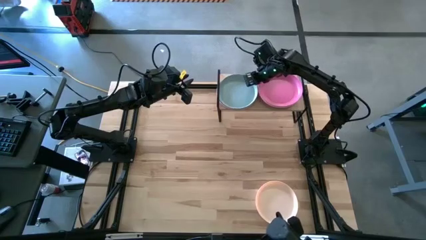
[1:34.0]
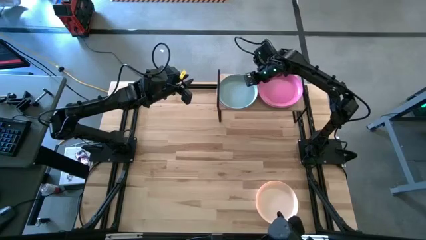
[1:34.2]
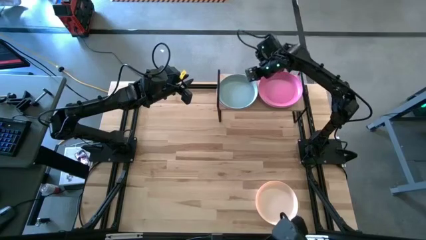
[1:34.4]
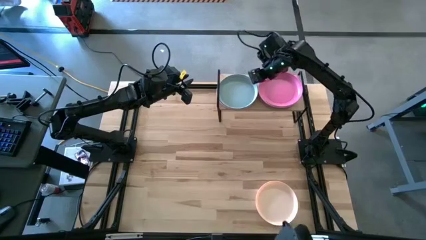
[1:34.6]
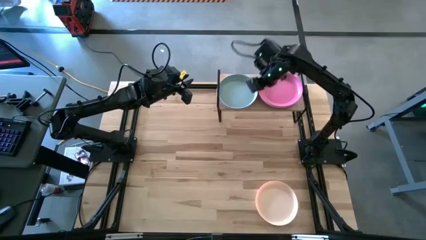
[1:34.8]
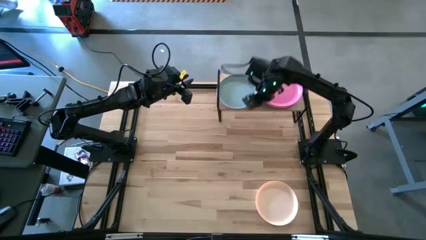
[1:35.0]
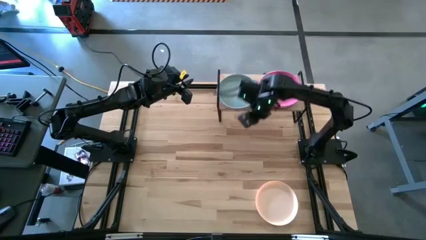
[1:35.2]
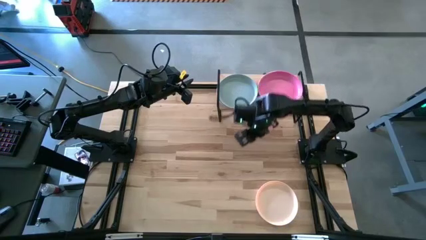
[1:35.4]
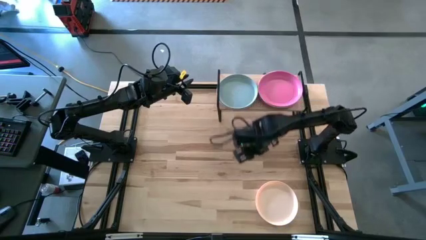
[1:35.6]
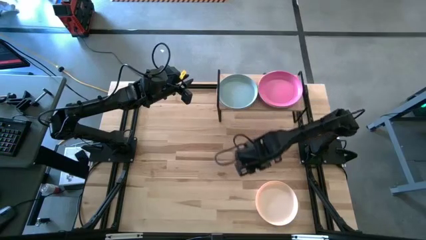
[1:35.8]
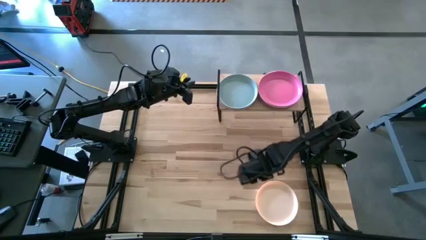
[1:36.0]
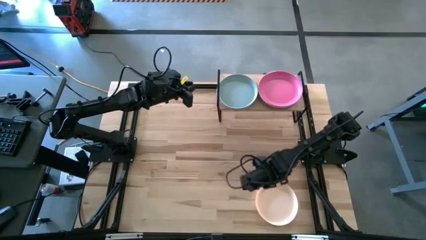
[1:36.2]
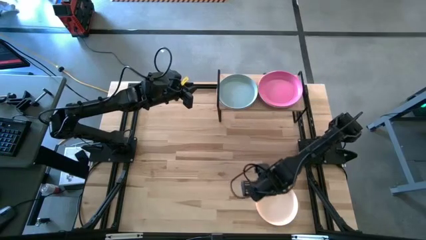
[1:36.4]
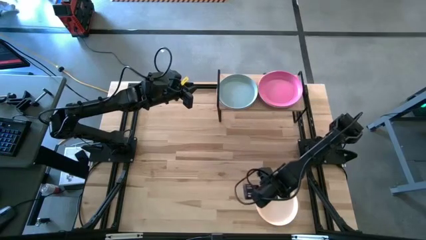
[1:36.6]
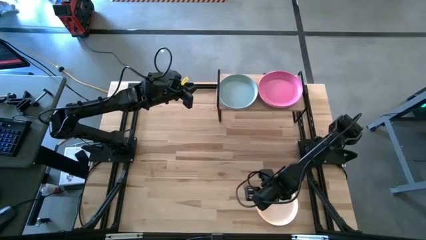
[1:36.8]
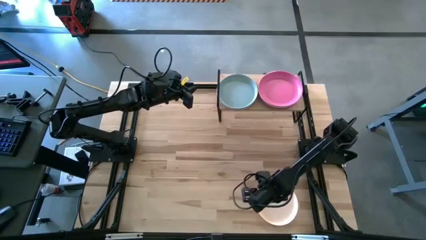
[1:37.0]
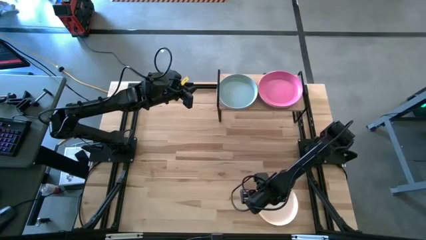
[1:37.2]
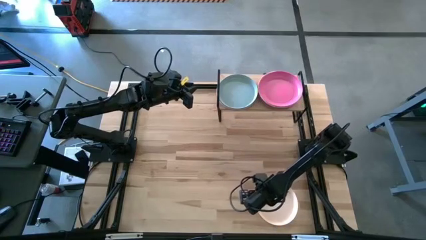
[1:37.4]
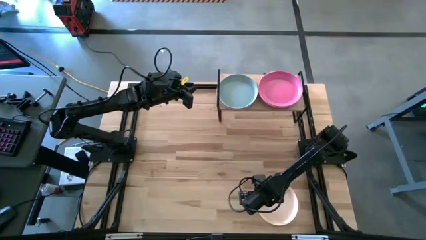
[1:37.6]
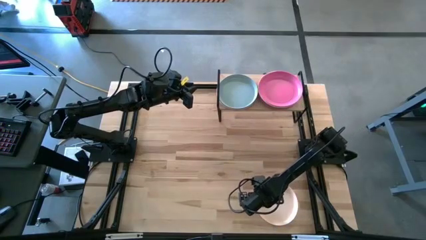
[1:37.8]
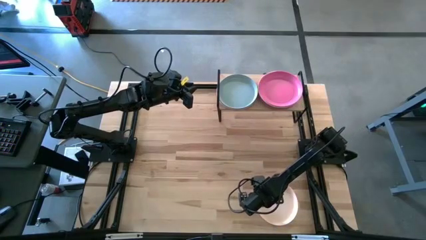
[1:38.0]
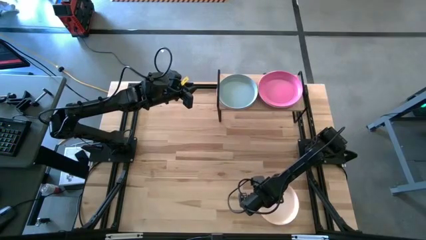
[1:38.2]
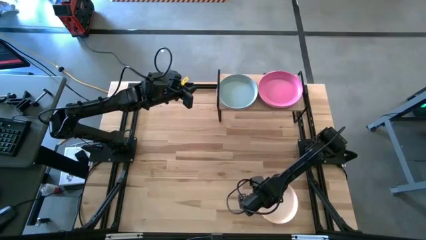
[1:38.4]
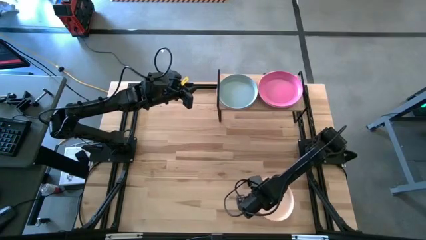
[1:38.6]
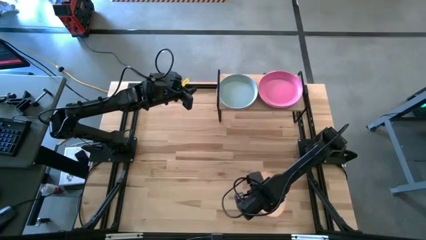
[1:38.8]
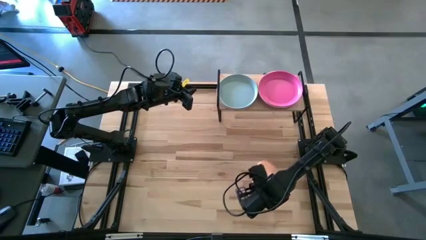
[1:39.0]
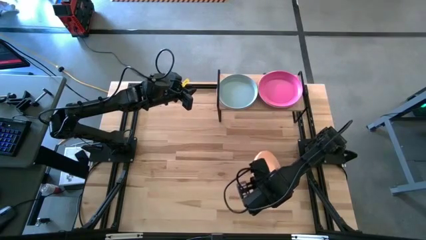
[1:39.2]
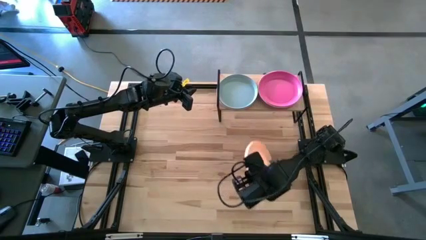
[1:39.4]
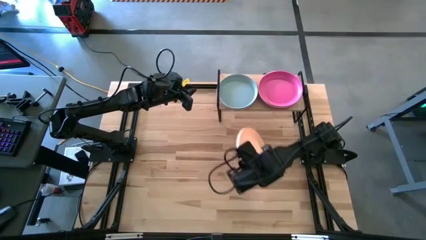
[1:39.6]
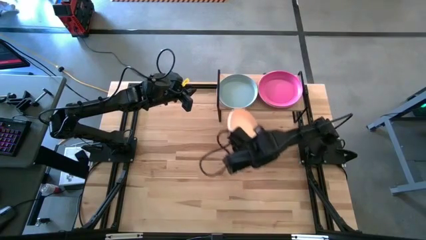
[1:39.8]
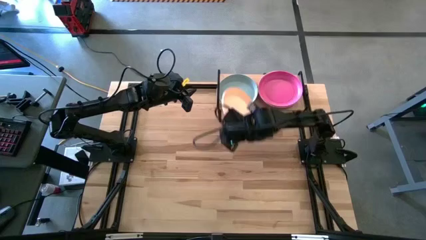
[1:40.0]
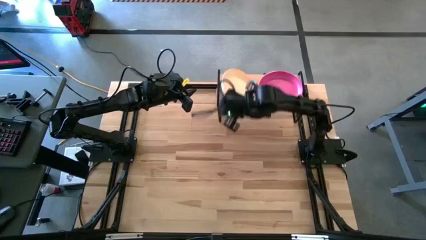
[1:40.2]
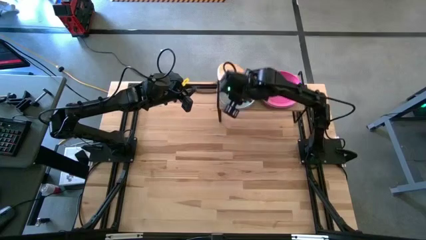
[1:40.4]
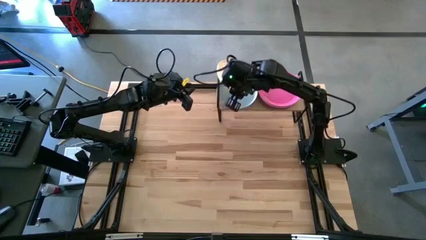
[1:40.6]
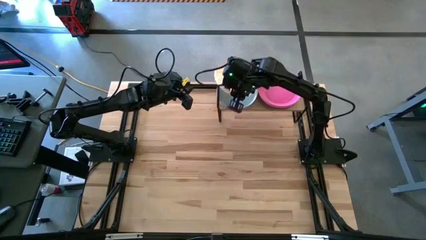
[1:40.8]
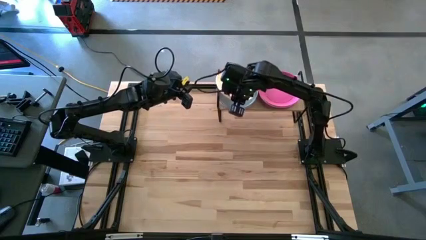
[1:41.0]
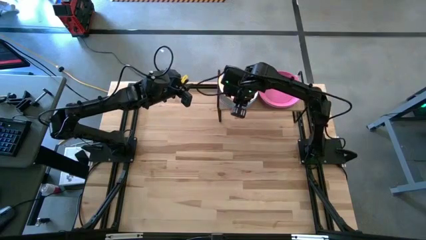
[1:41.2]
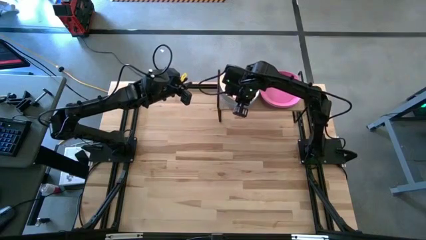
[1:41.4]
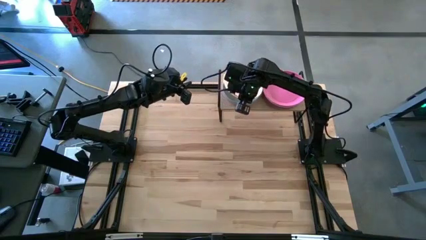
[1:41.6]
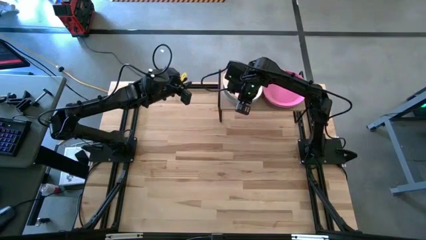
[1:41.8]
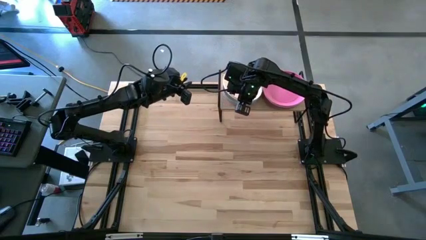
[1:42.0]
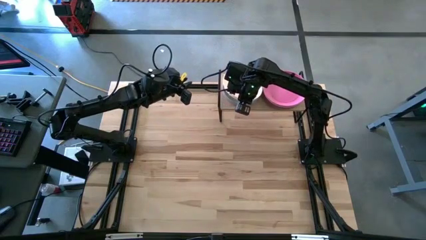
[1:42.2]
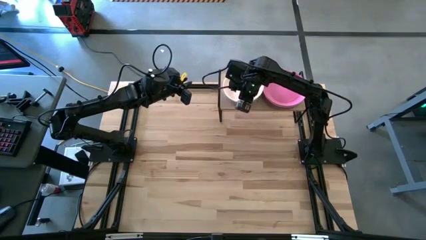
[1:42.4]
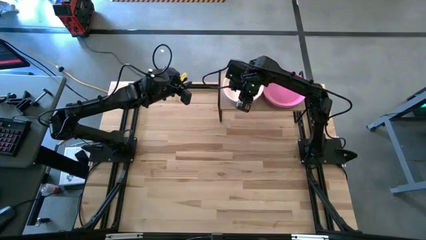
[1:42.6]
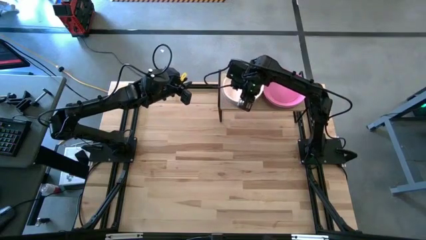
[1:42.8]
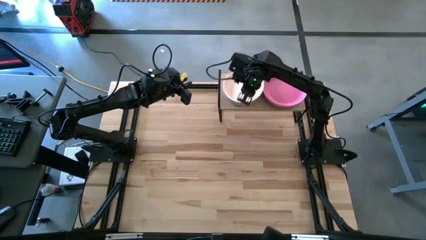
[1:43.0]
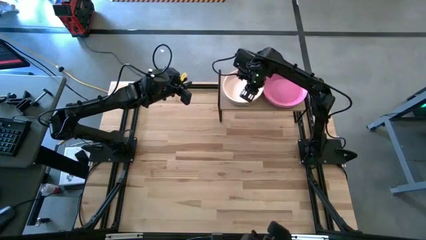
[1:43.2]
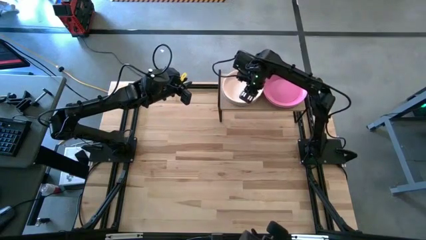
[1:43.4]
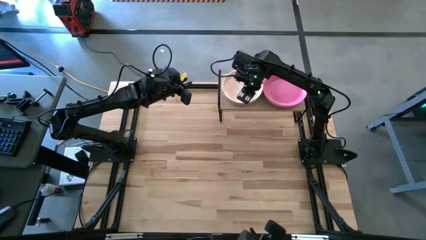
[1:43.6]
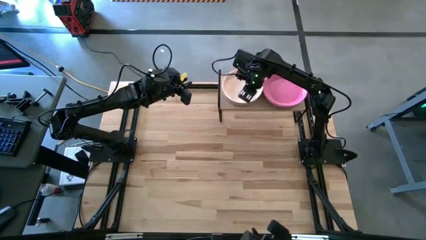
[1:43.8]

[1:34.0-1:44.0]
Task: Place and stack plates onto a shelf
Stack the light orange plate on the blue plate on the shelf

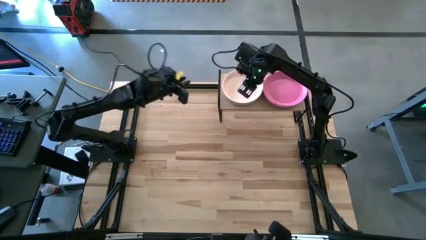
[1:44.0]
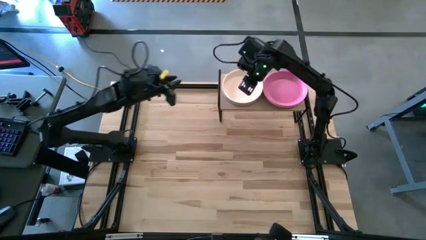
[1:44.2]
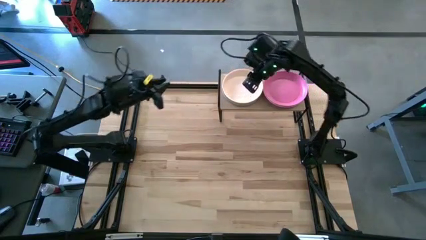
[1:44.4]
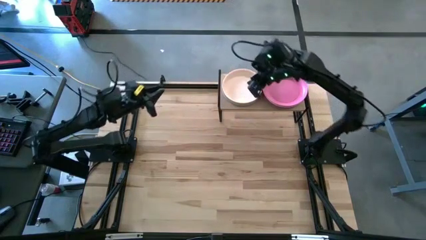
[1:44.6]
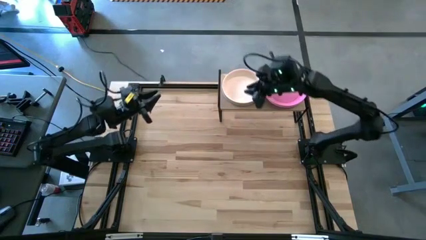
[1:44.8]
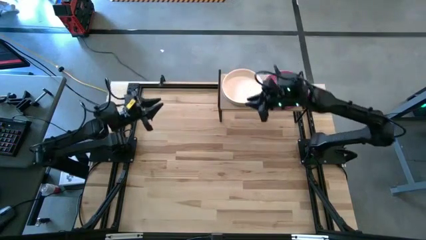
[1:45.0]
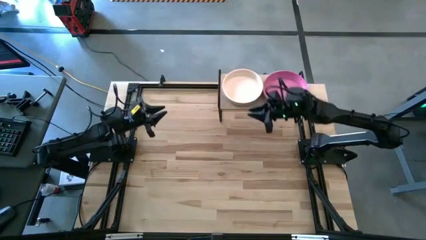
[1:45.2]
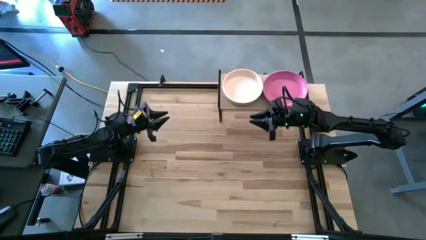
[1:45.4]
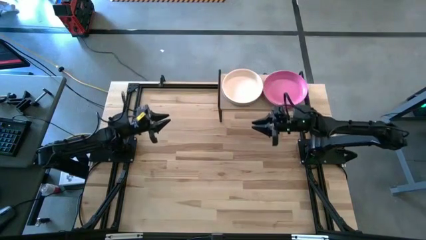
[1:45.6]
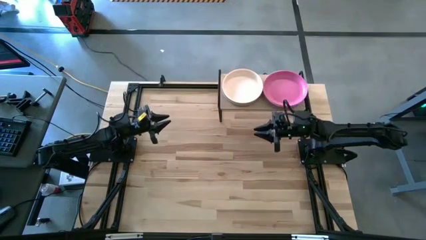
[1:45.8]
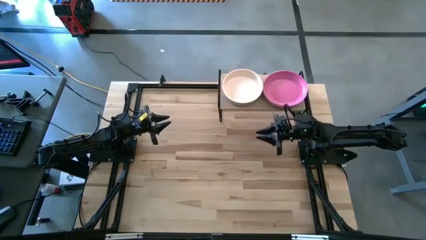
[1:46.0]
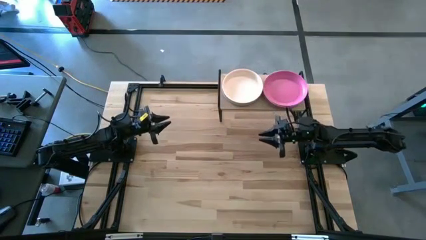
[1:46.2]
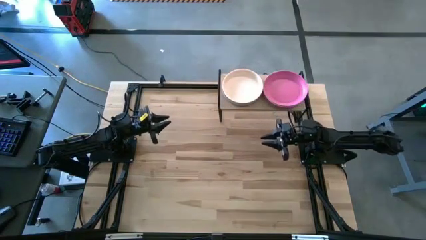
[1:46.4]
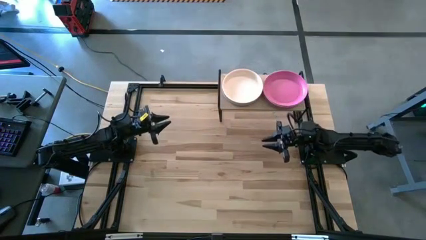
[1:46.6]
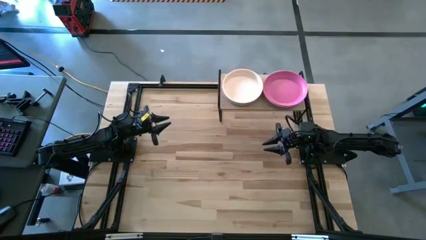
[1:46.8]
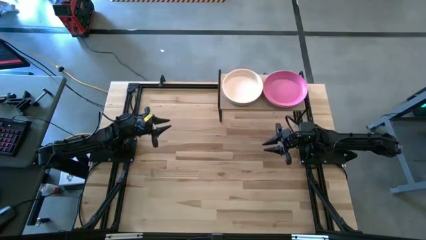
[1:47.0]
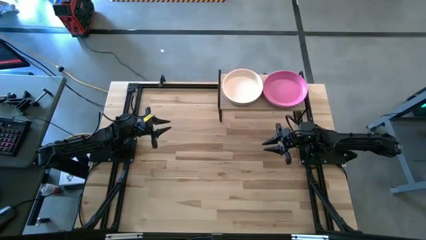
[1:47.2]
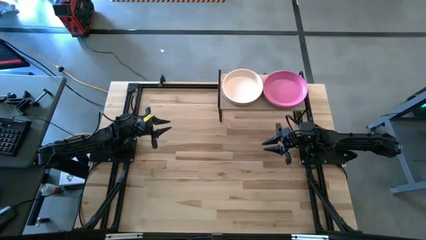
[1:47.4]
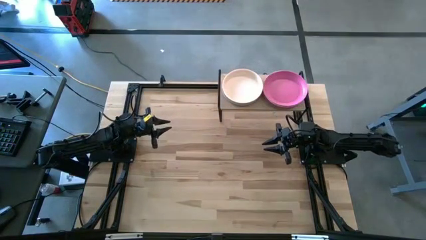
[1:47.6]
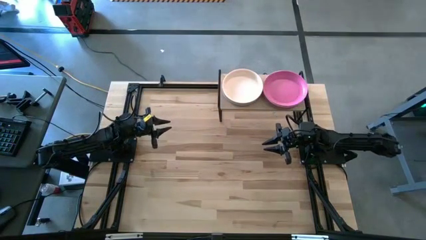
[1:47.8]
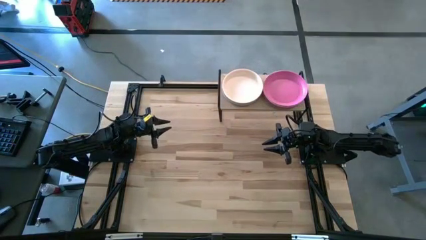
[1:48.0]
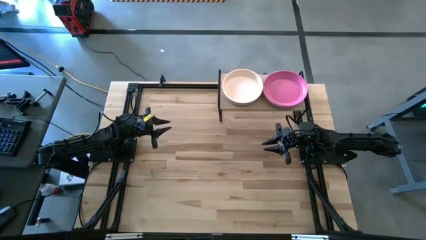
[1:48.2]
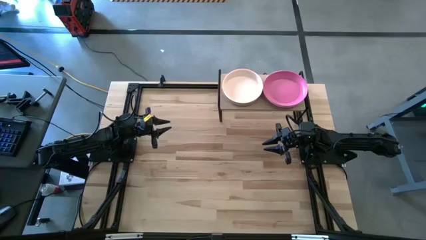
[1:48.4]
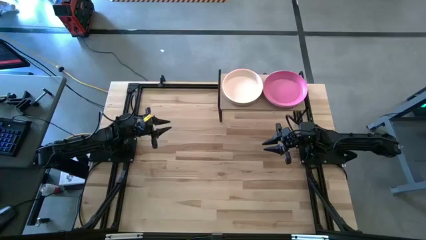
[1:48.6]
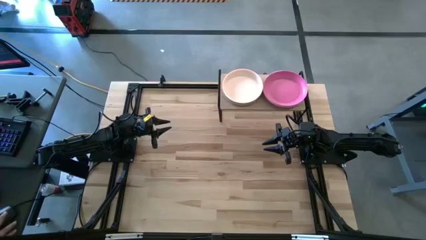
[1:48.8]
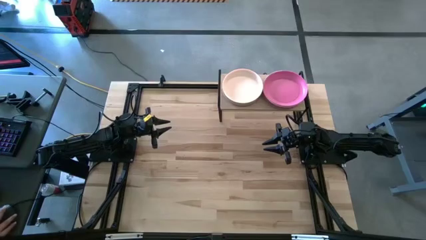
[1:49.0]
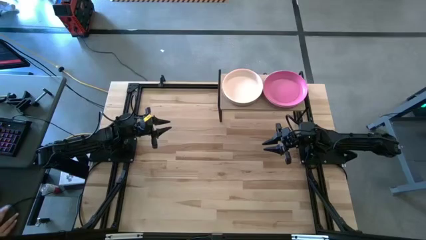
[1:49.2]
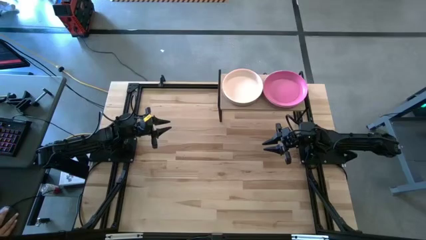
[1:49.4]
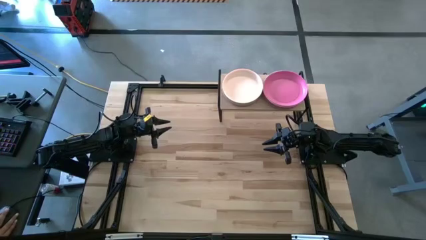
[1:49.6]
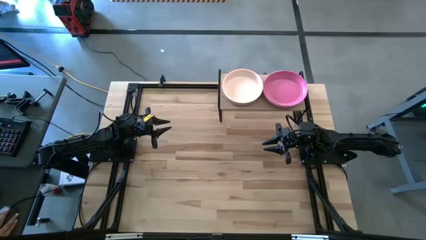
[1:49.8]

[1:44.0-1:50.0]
Return to Home Position
